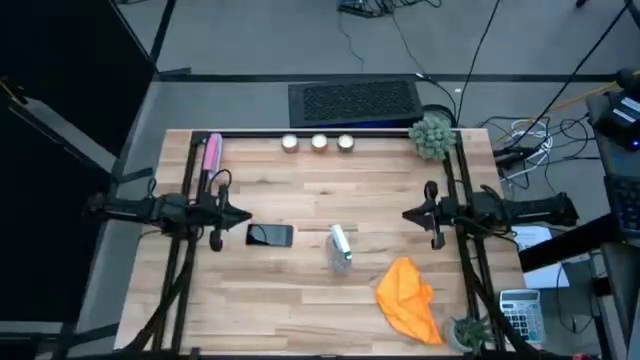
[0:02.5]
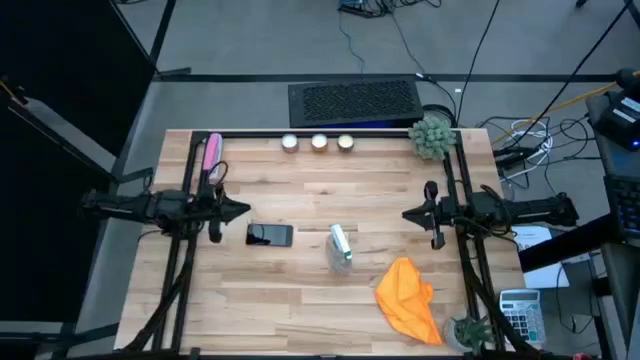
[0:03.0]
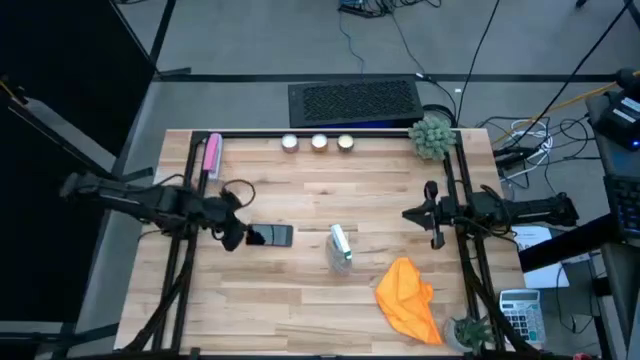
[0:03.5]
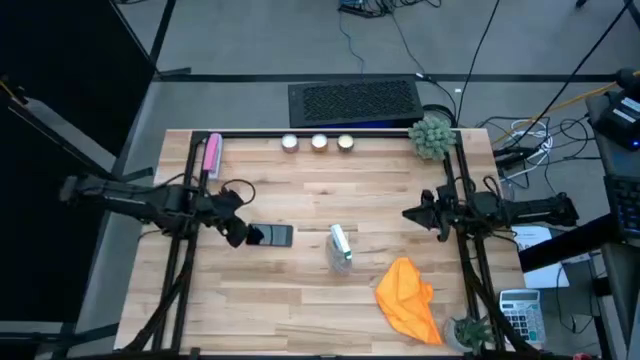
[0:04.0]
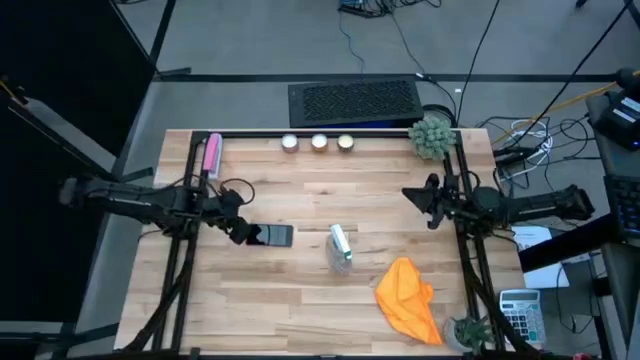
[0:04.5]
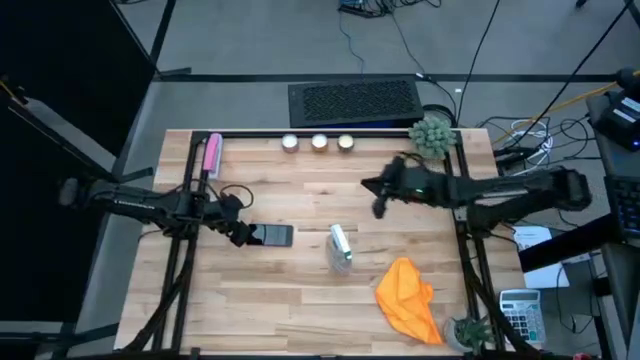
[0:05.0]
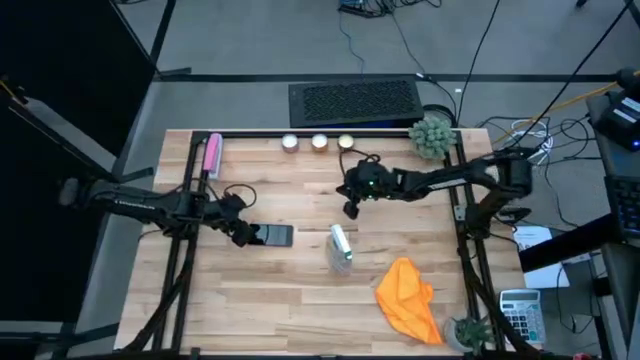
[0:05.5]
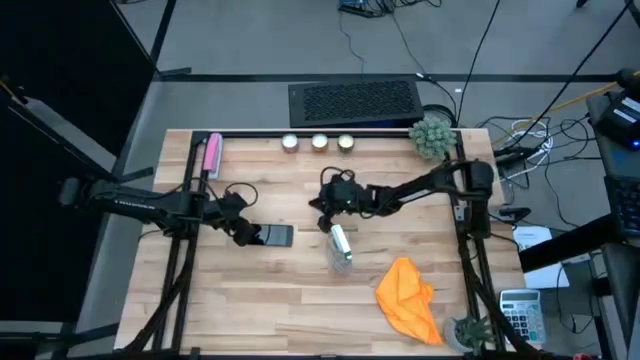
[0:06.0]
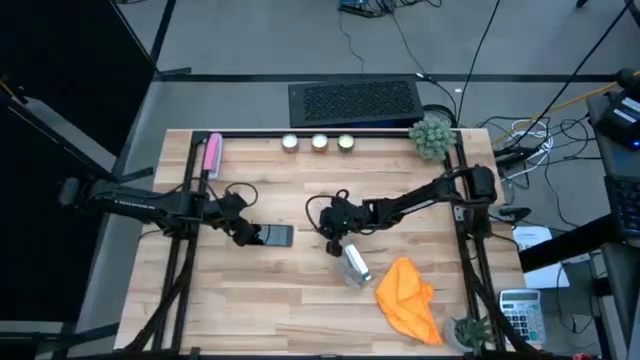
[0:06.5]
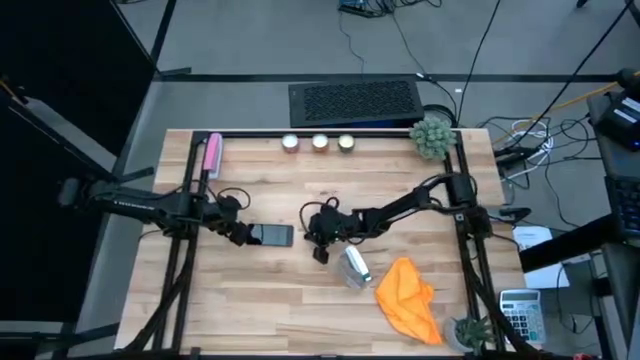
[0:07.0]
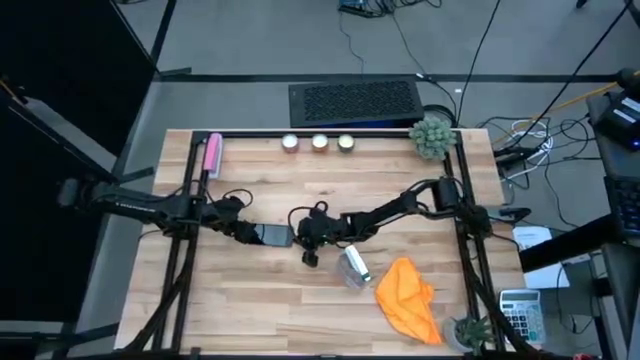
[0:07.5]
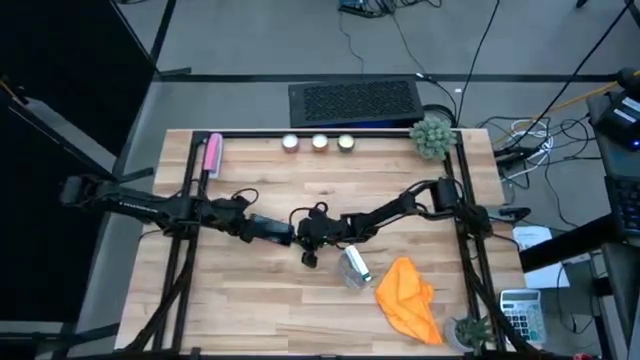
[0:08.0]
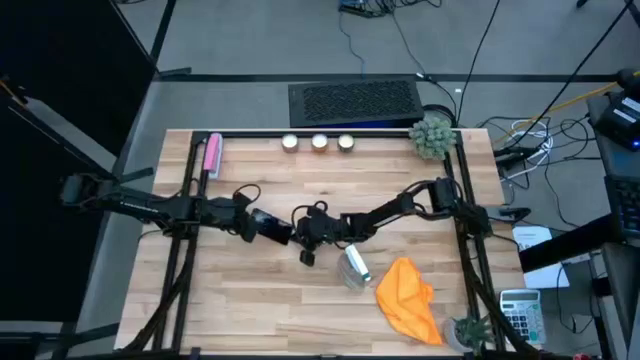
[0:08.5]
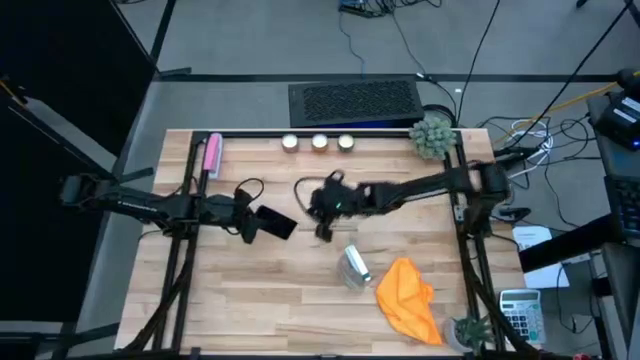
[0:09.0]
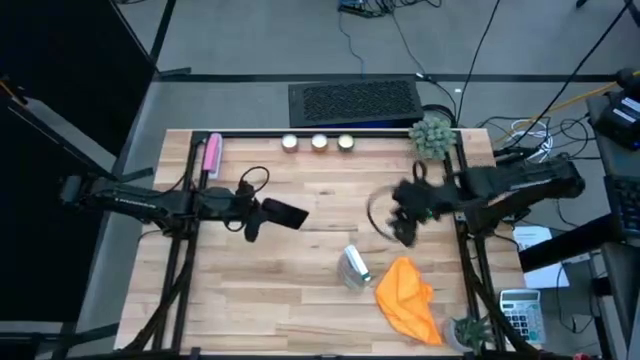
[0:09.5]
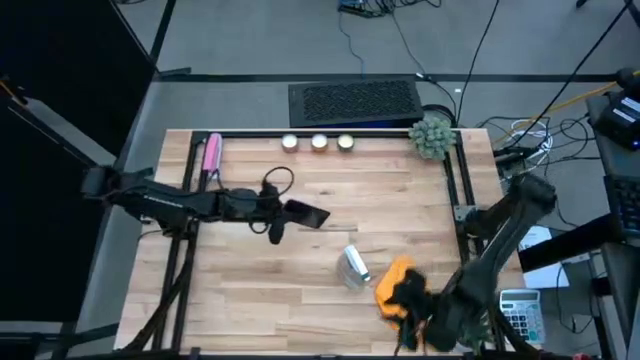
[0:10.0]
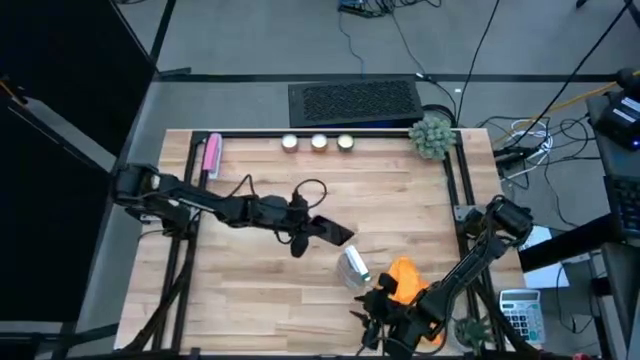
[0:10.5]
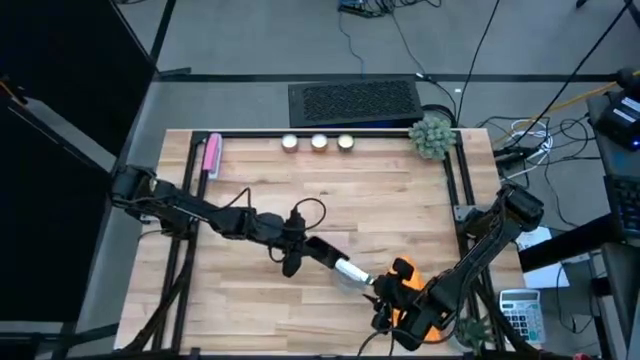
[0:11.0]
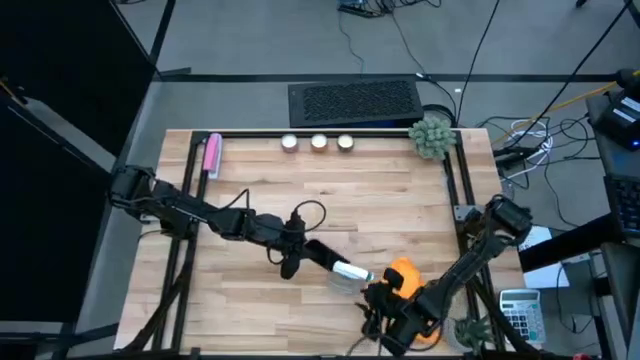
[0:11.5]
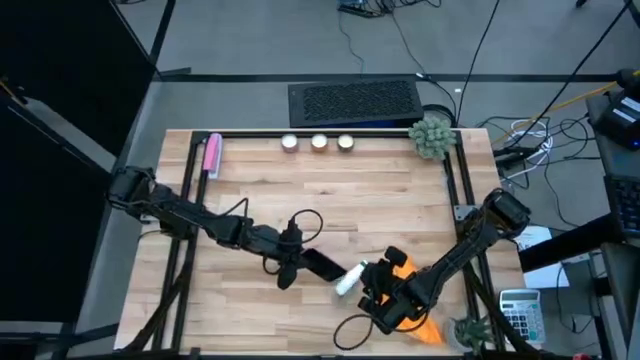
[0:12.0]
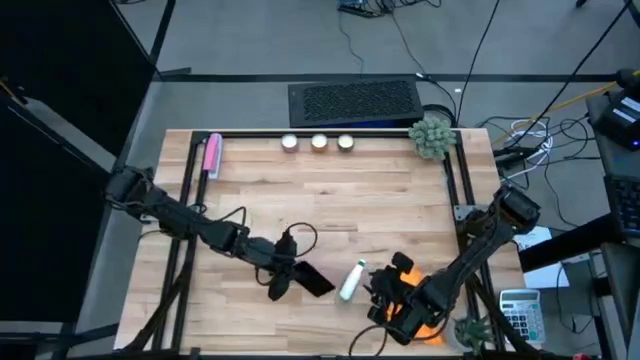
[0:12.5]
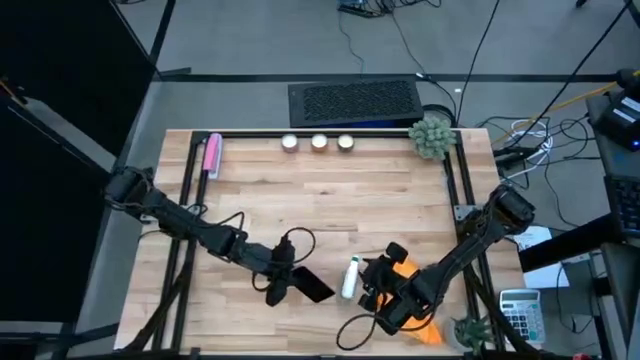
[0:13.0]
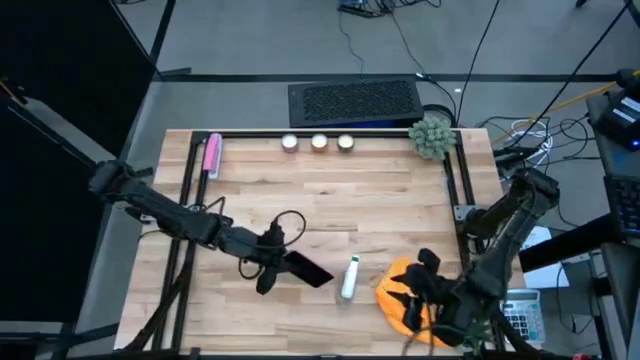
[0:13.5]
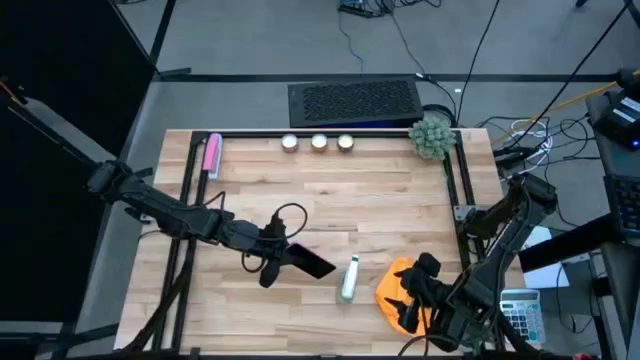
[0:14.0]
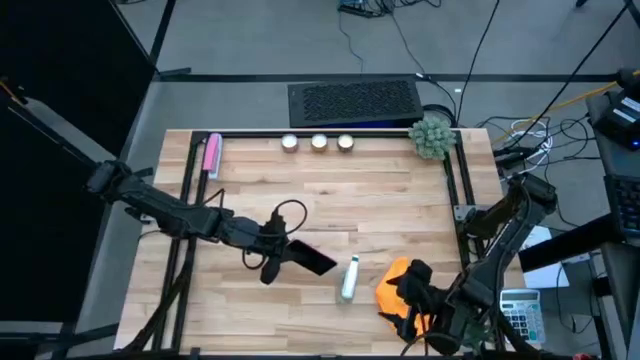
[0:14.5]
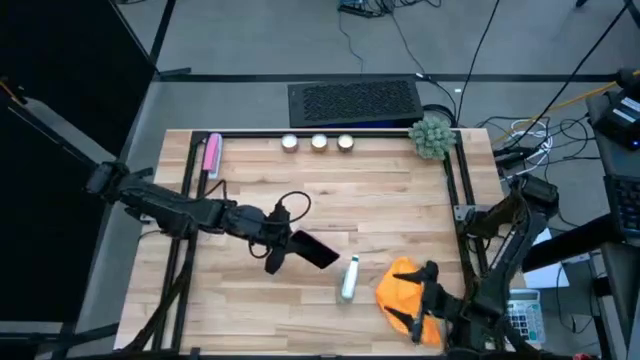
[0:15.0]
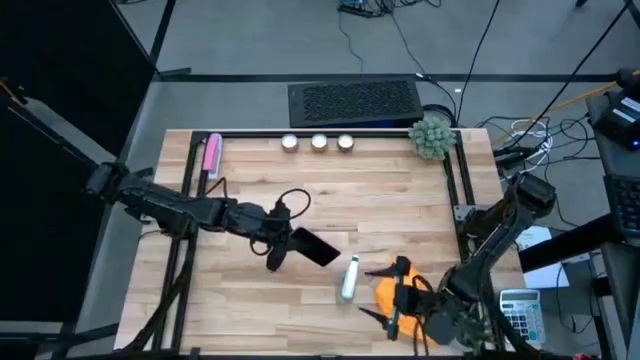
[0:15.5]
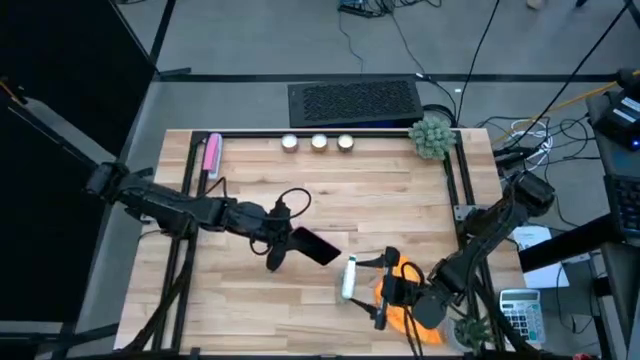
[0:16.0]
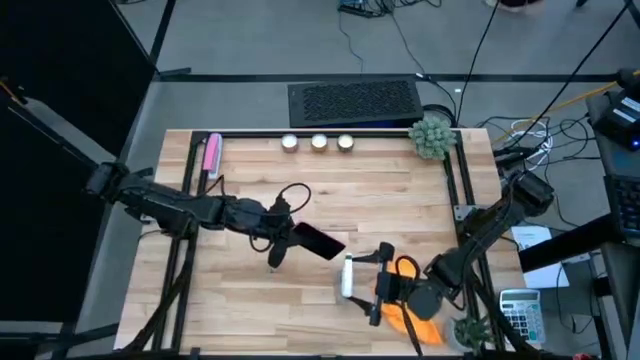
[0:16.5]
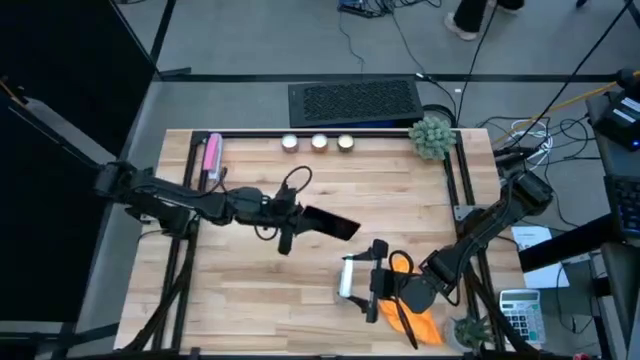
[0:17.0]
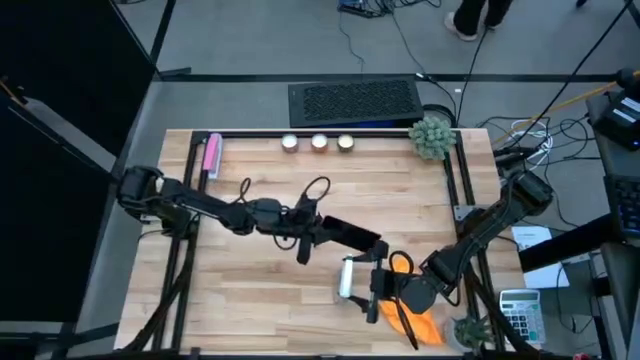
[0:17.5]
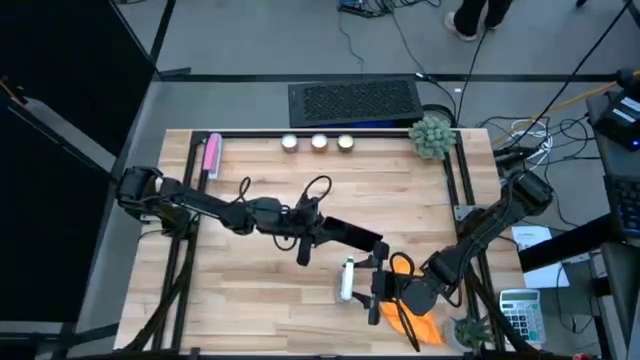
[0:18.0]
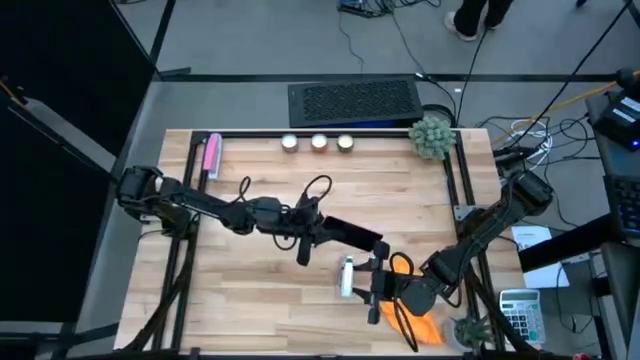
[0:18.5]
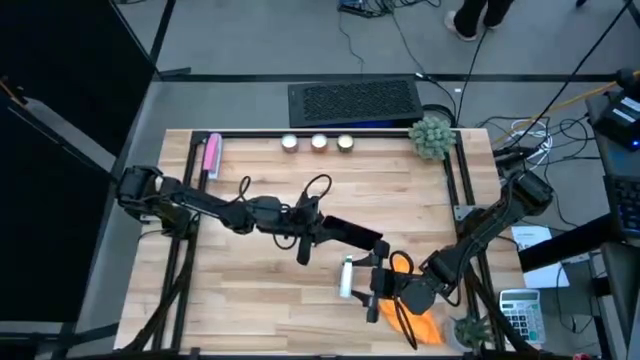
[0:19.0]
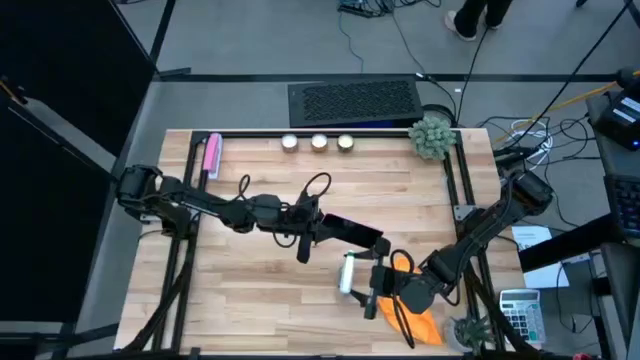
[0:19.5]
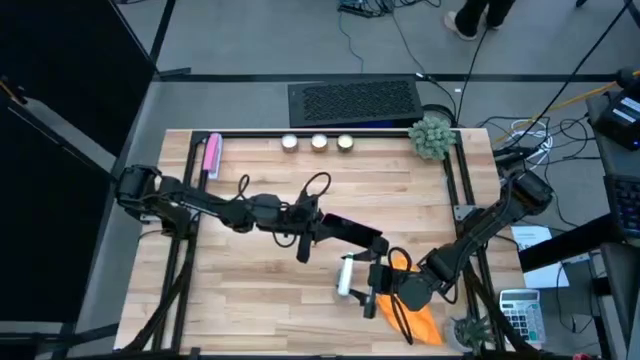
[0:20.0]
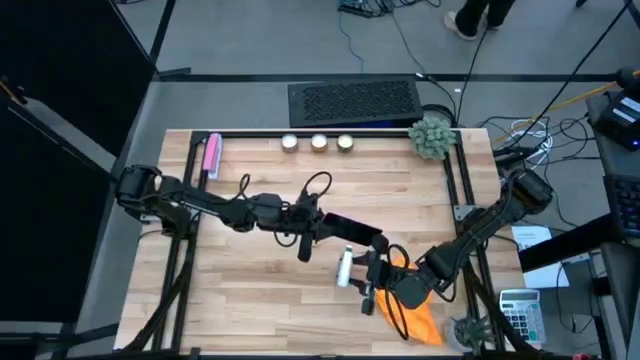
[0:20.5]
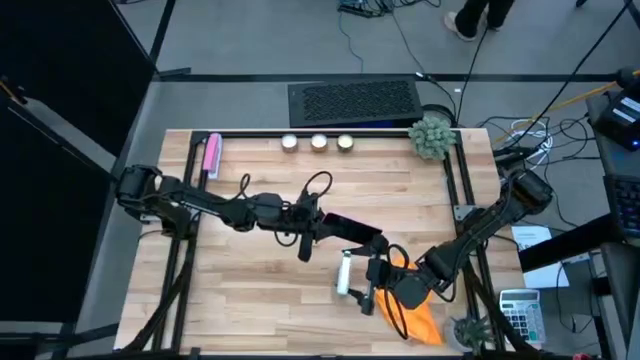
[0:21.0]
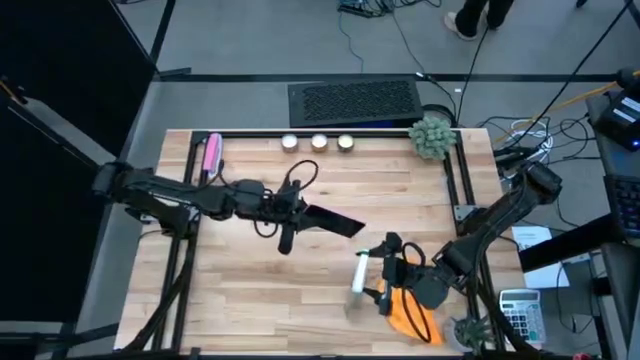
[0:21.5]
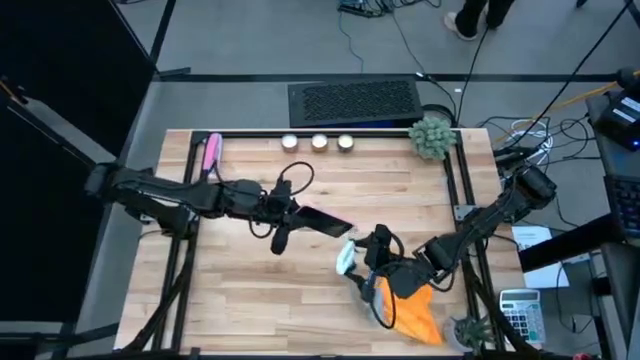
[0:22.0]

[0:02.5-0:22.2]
Task: Apply microfiber cloth
Spray the front of the cellphone using spray bottle
